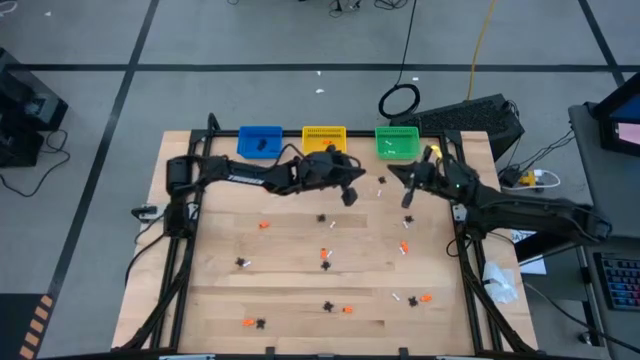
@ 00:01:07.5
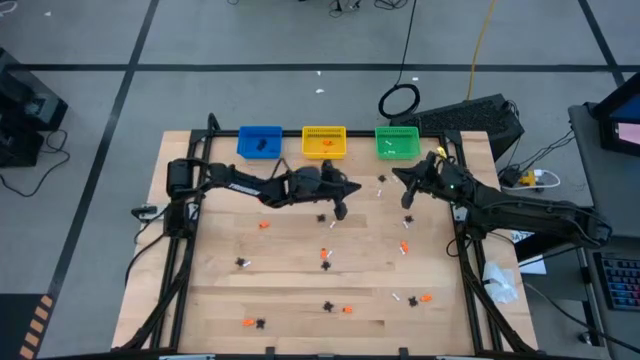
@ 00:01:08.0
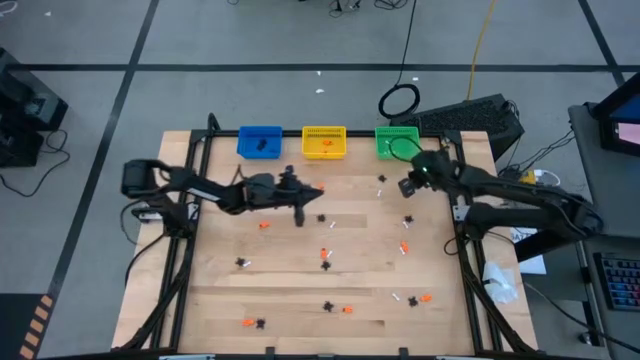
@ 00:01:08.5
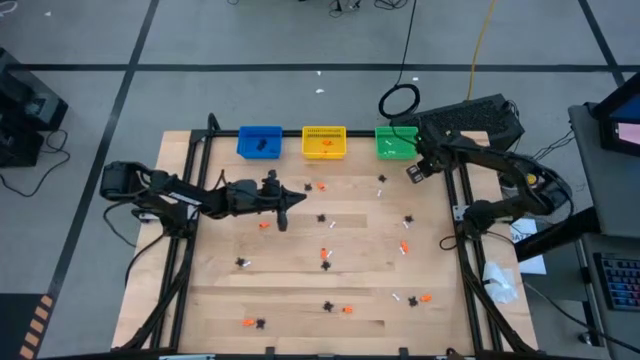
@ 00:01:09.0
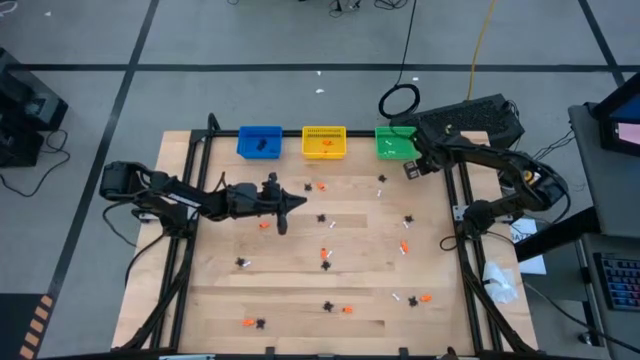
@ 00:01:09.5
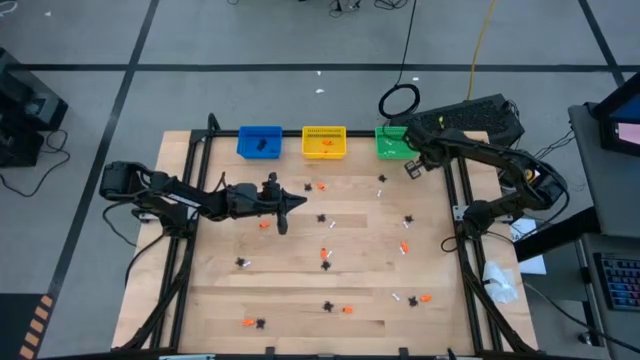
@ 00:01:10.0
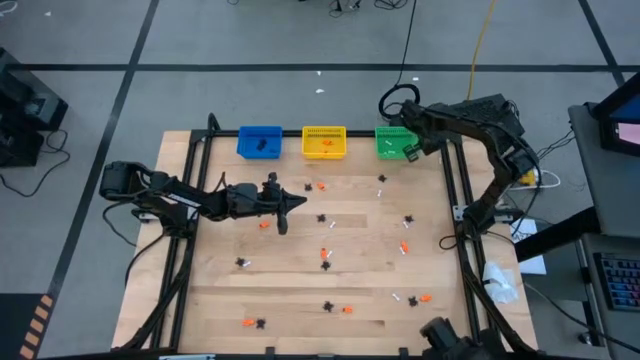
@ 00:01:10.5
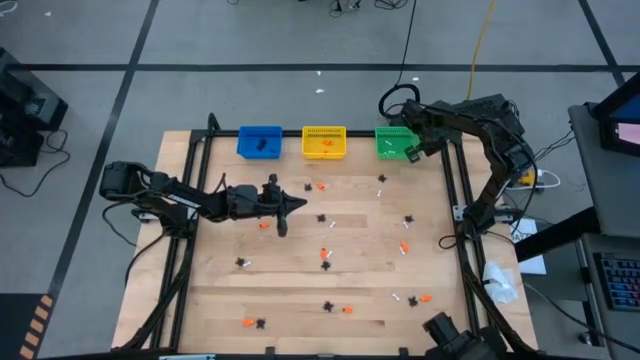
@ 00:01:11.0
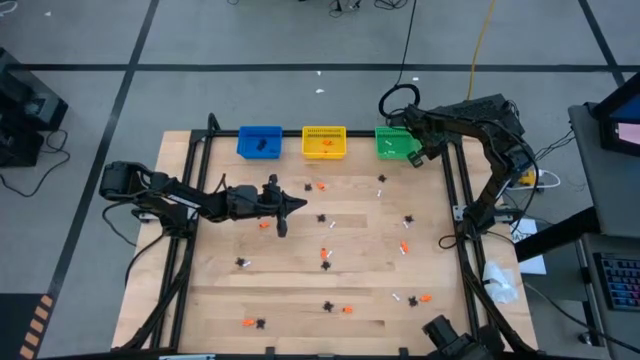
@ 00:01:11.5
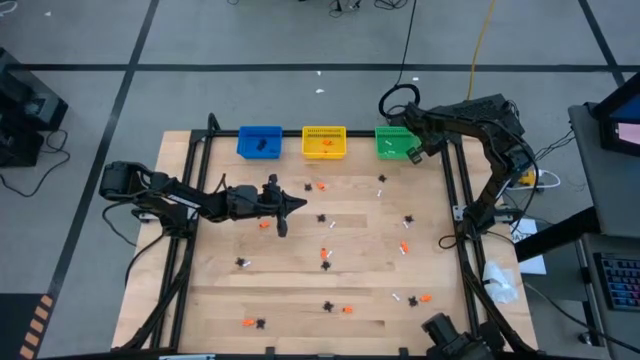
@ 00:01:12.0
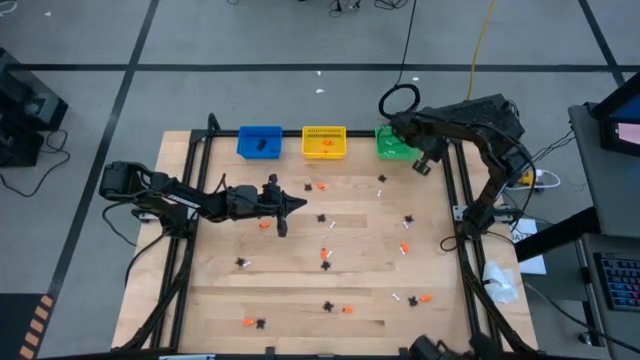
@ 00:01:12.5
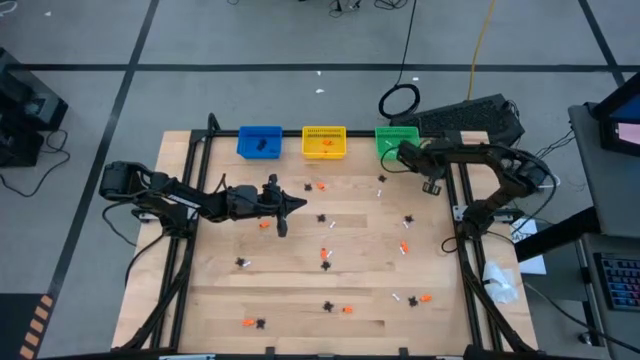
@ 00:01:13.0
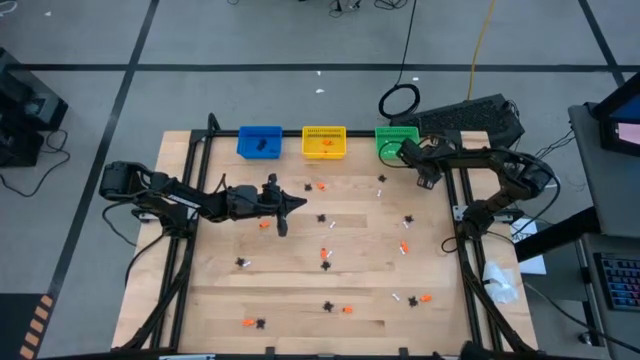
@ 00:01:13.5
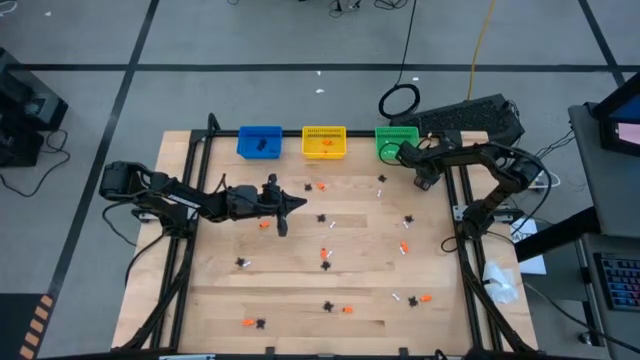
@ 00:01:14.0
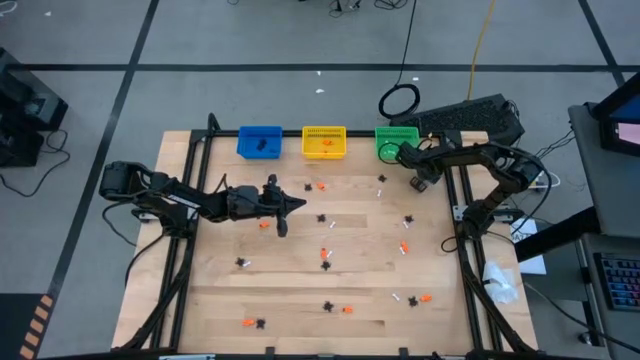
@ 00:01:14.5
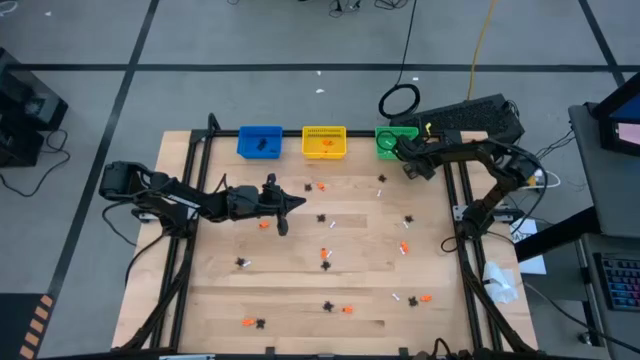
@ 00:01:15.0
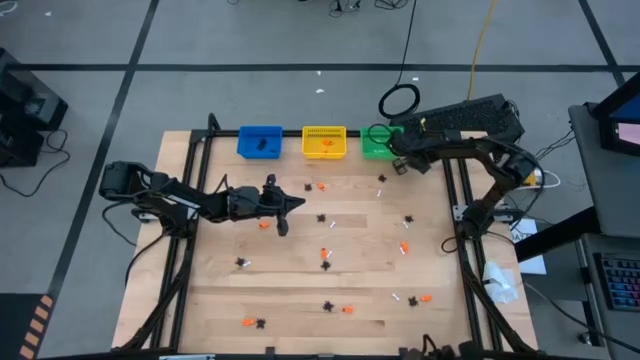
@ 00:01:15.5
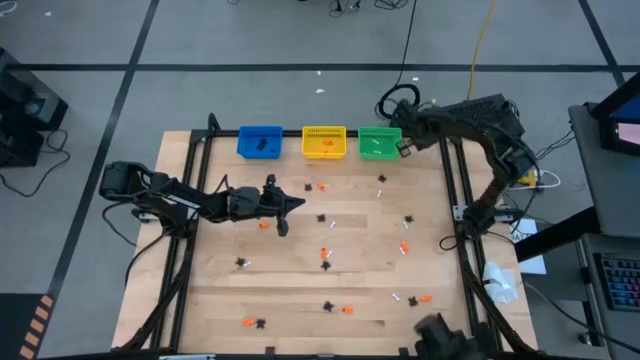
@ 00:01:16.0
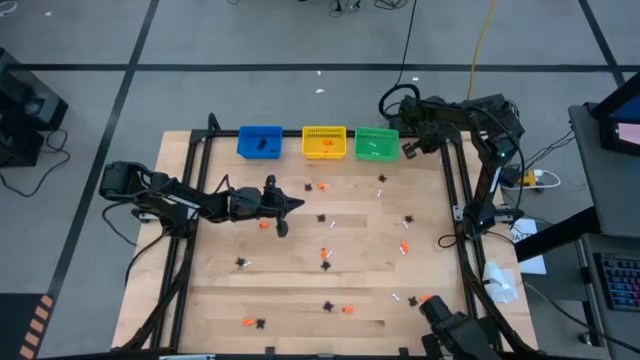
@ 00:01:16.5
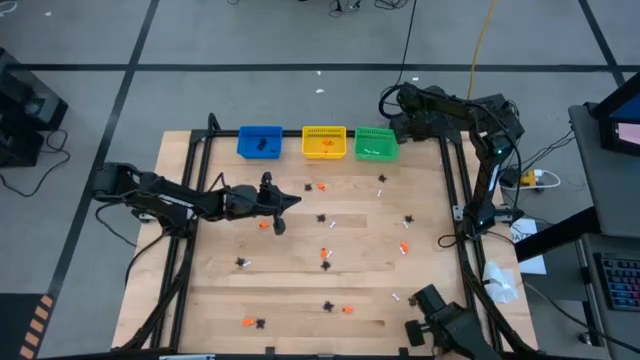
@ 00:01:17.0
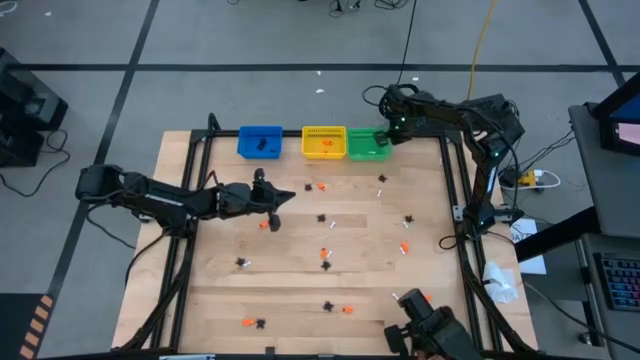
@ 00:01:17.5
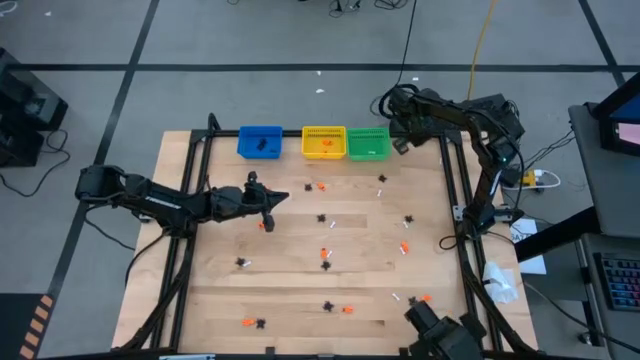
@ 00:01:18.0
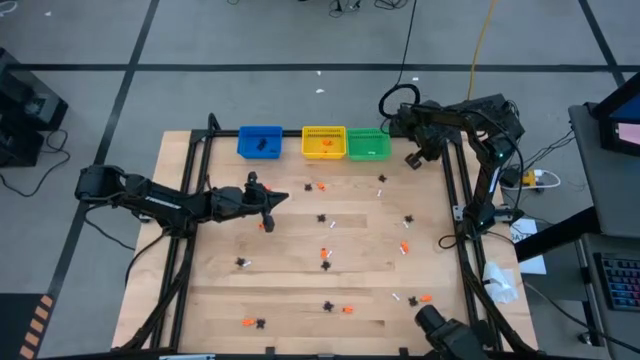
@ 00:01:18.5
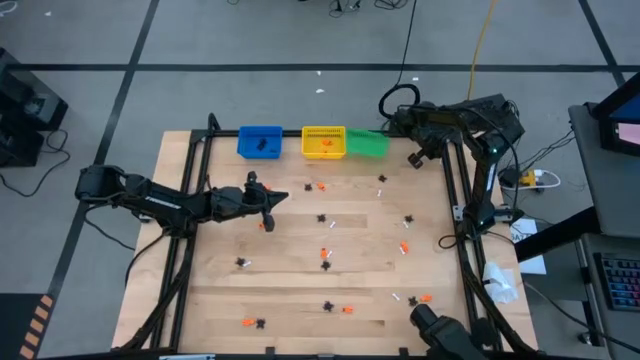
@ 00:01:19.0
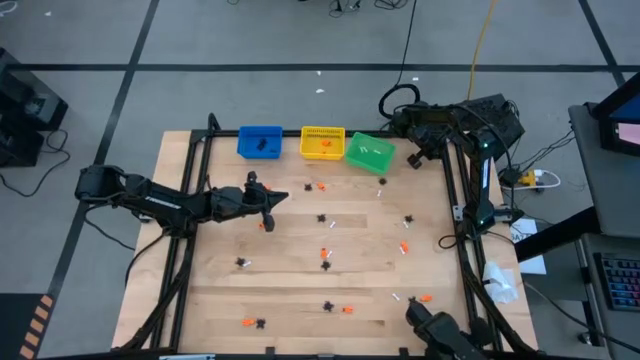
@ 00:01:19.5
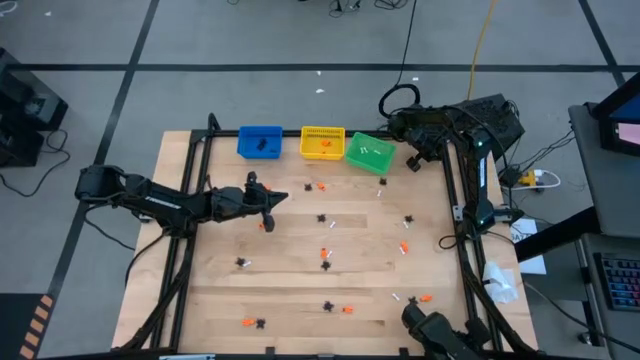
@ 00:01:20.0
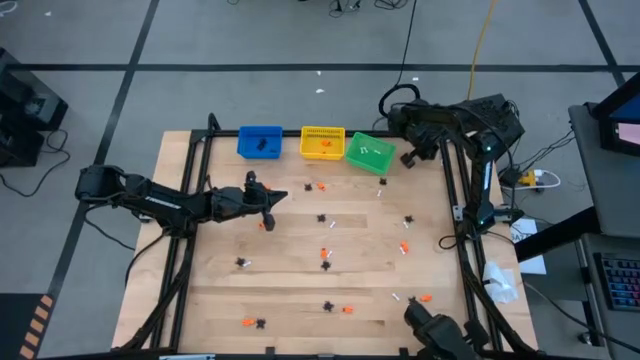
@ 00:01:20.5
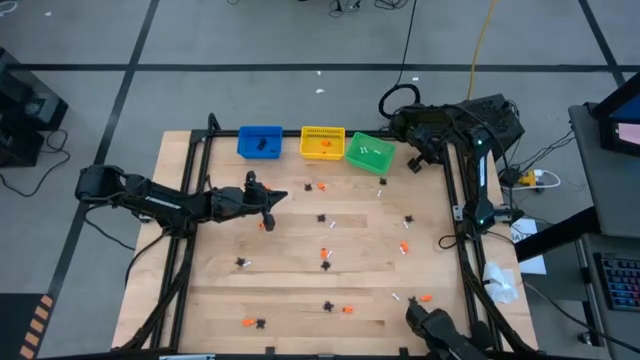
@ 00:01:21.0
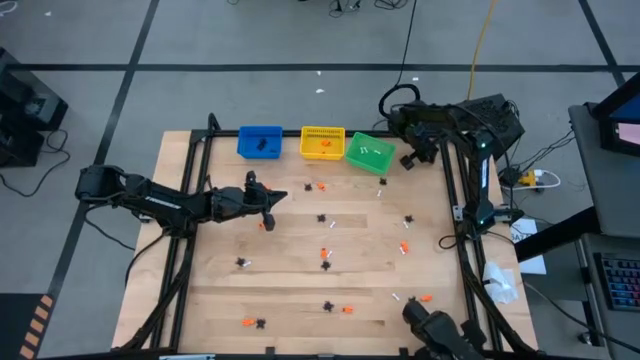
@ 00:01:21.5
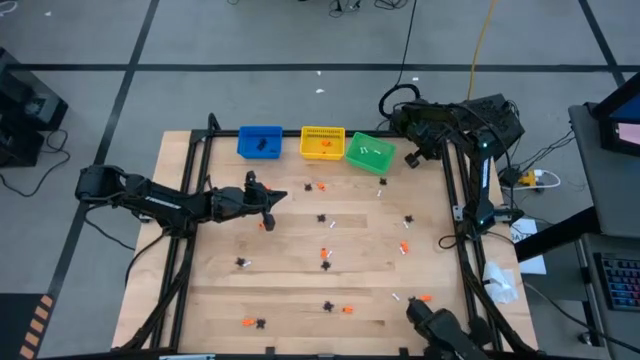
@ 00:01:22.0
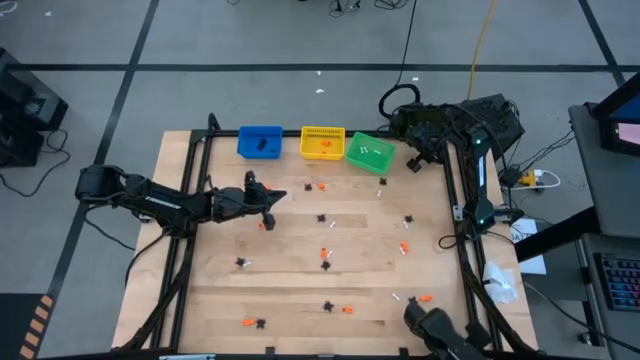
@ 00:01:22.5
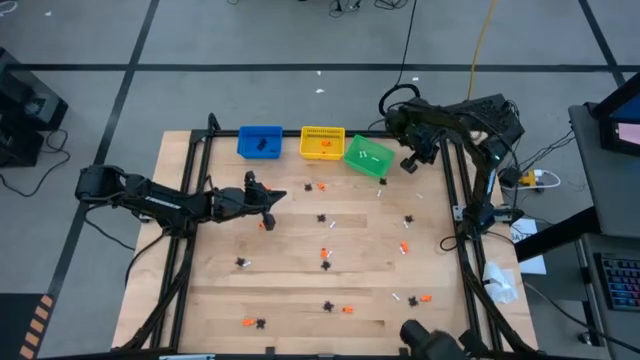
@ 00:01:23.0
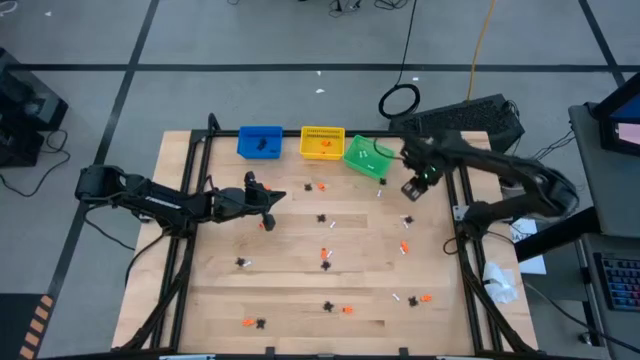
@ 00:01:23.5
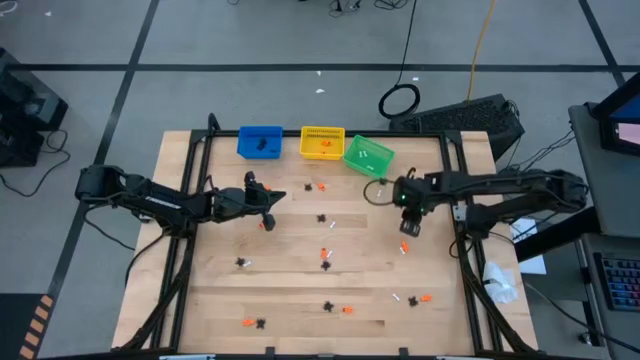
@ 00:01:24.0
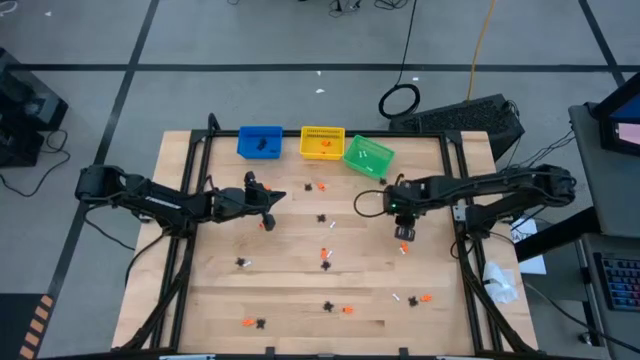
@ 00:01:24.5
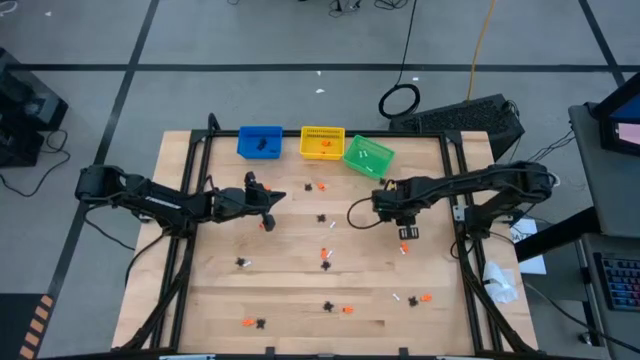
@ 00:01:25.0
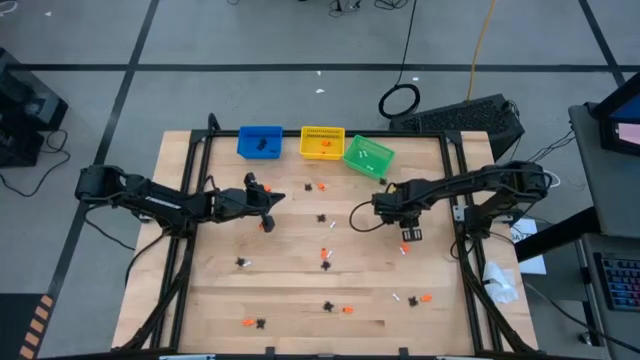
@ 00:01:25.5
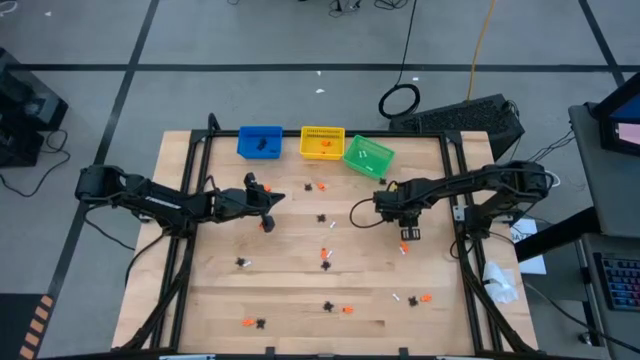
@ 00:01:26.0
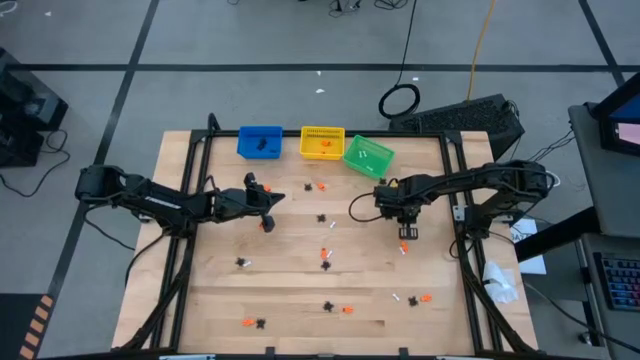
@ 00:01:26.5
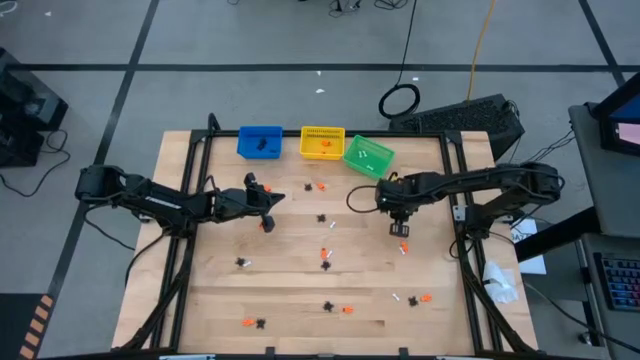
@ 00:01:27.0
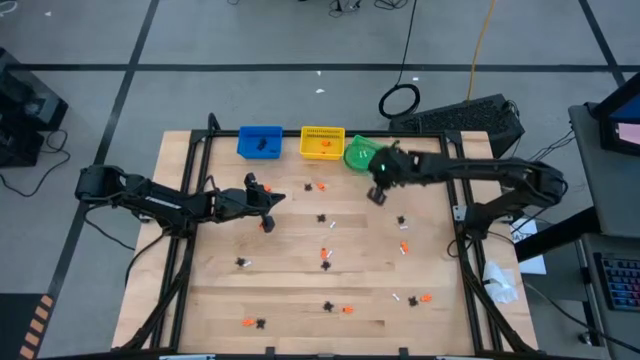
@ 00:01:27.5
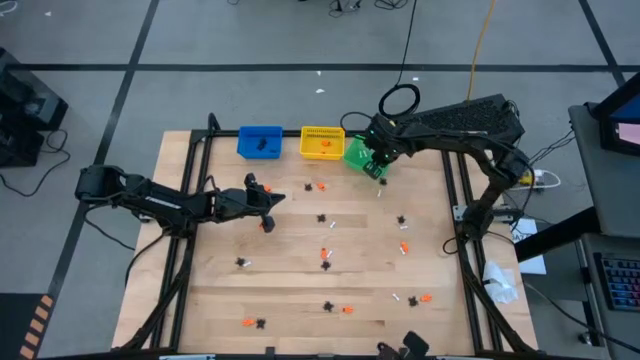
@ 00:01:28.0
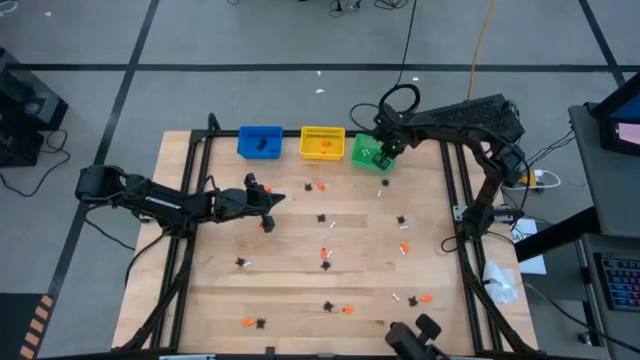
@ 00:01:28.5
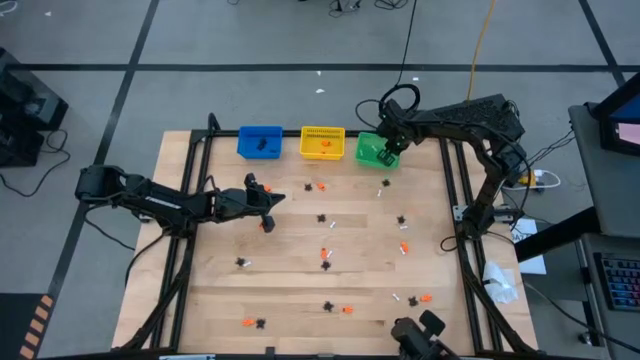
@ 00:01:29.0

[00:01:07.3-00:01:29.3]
Task: Sort Halloween decoration
Put the white bone toy into the green bin
